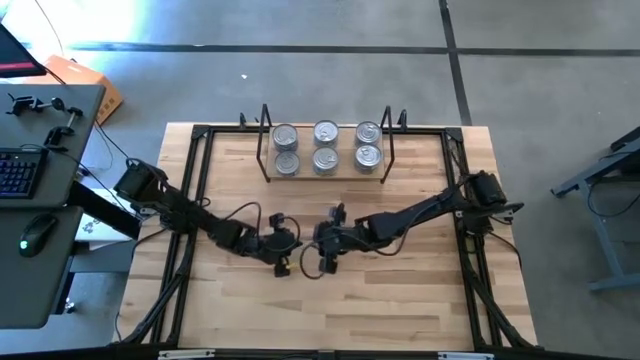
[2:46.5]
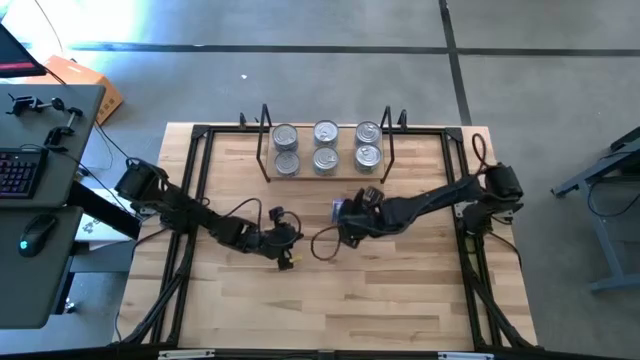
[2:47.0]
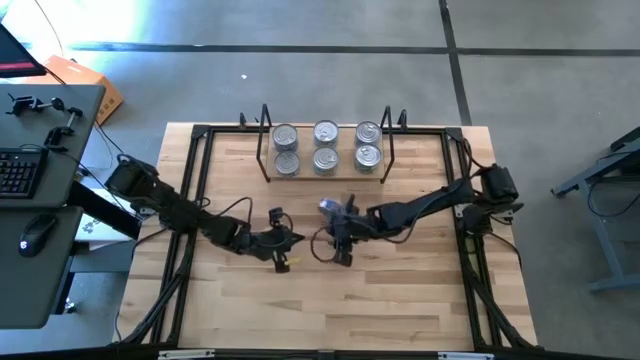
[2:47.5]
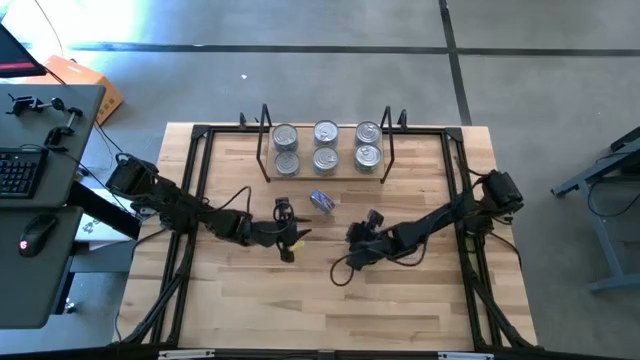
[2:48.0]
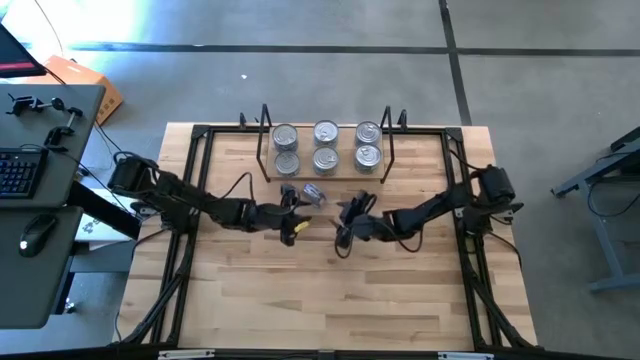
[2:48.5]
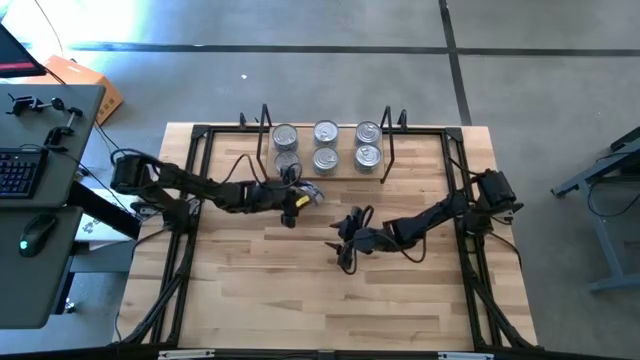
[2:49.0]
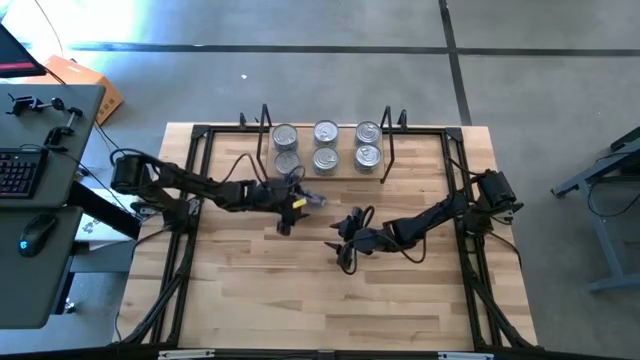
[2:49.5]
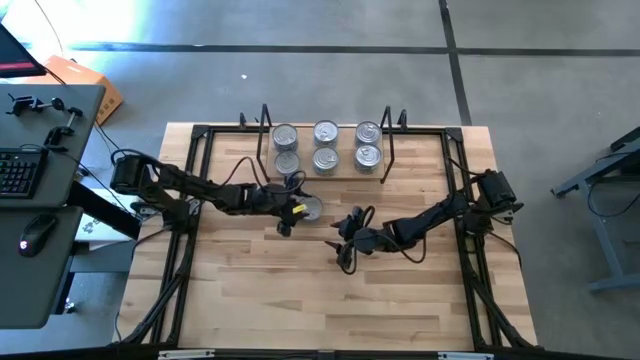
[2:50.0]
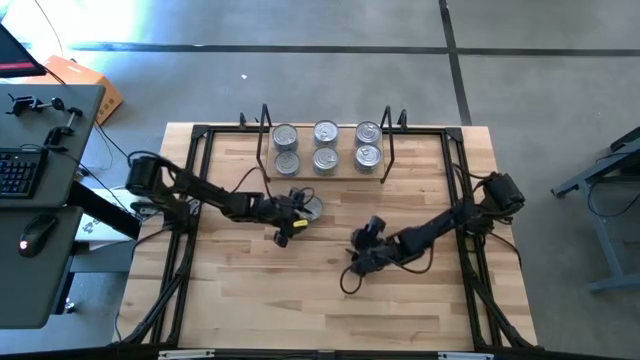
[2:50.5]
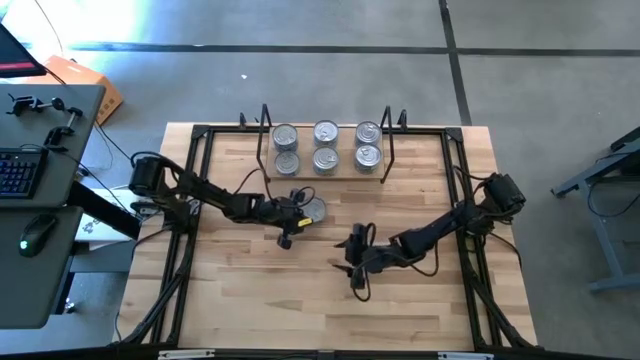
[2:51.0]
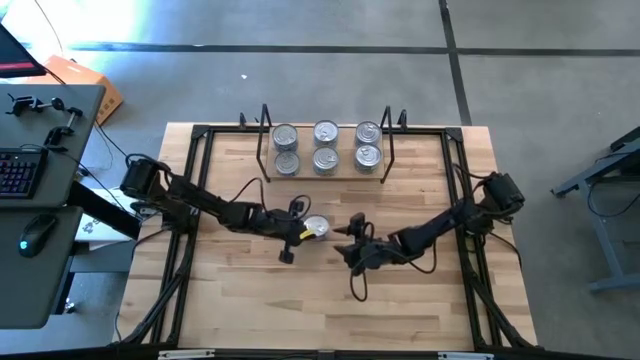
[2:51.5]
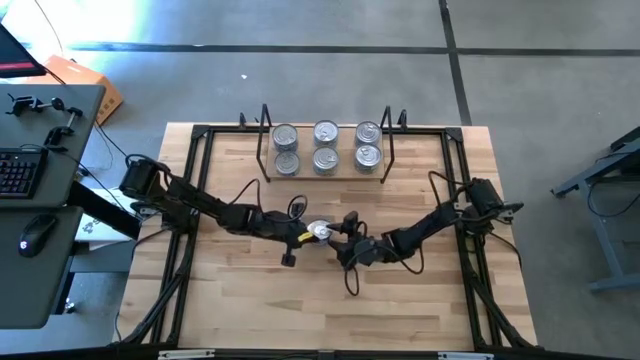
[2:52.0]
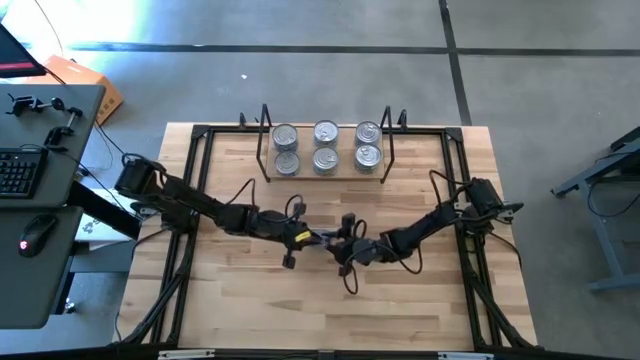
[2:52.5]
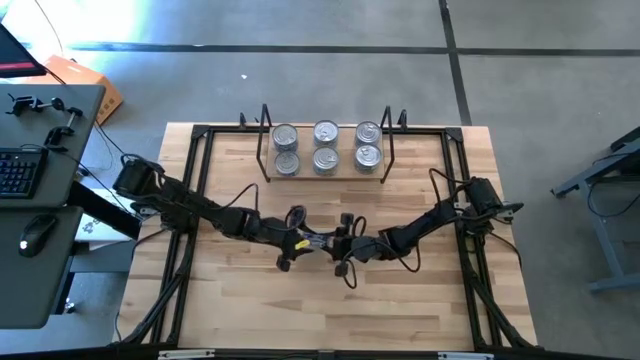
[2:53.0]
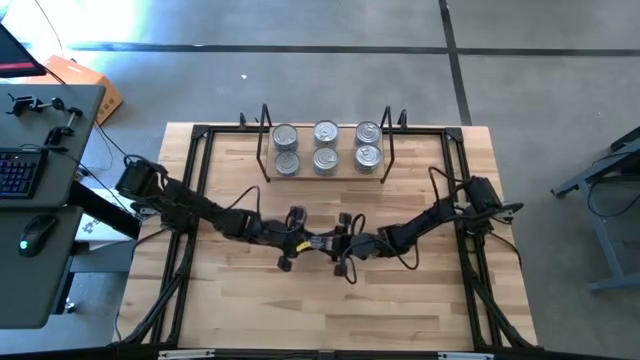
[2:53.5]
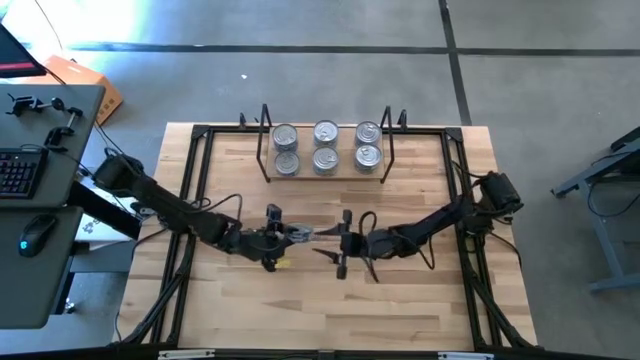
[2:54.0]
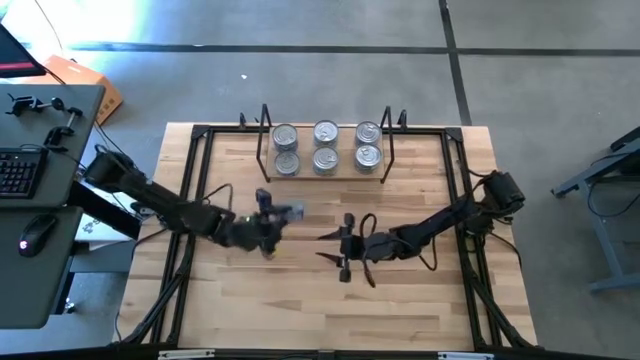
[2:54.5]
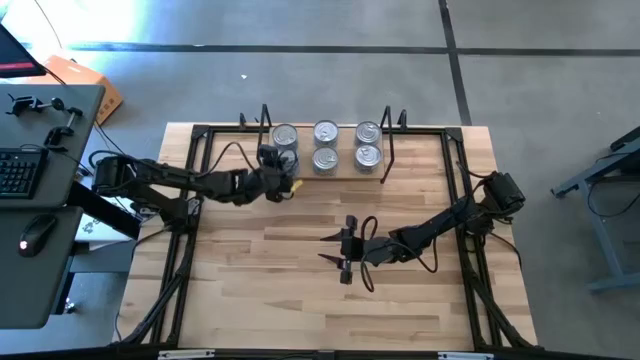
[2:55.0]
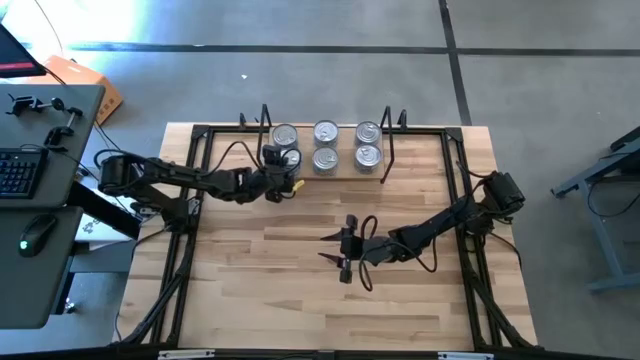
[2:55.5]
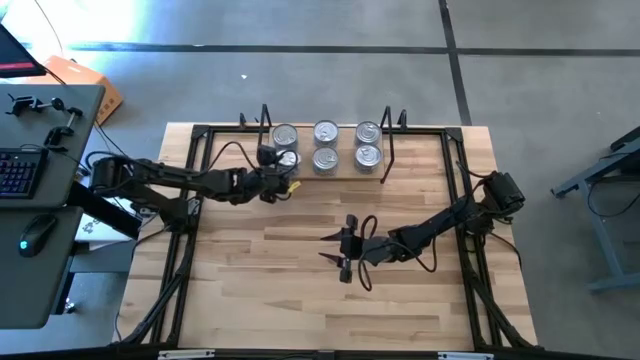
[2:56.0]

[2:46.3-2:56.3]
Task: Stack canned seafood by type on shelf
Stack the blue tuna can on top of the other blue tuna can on the shelf

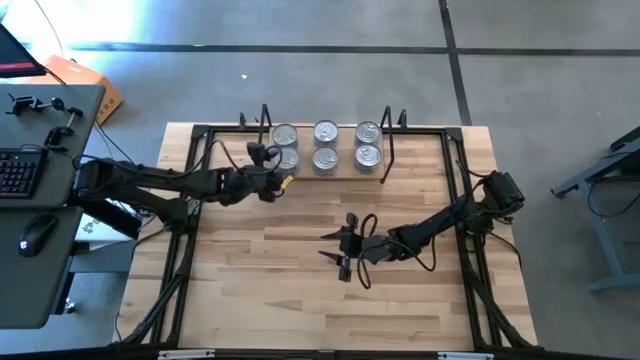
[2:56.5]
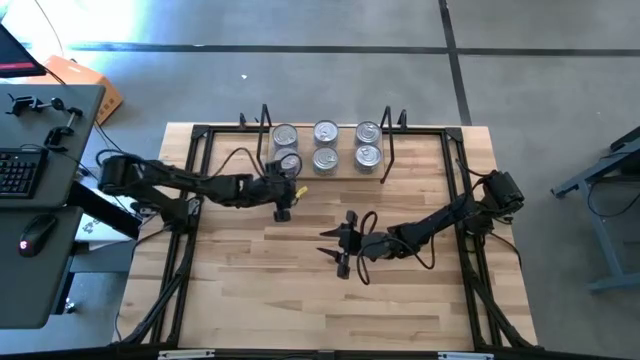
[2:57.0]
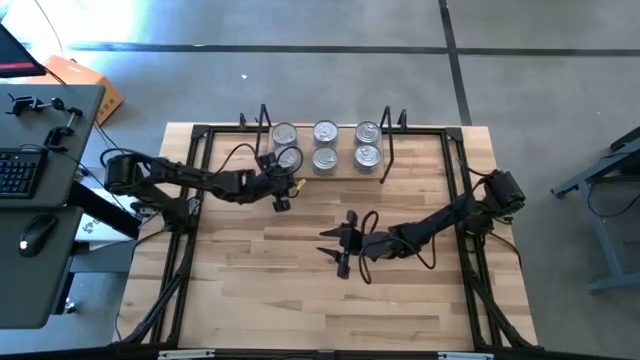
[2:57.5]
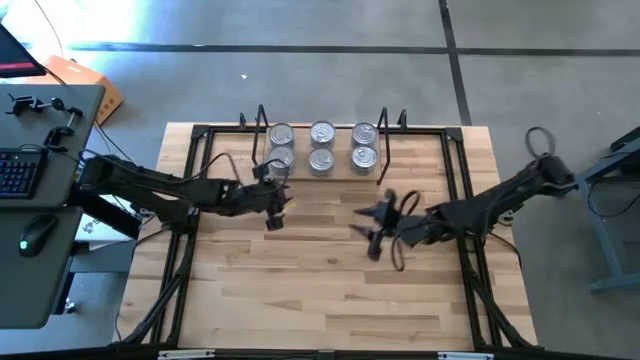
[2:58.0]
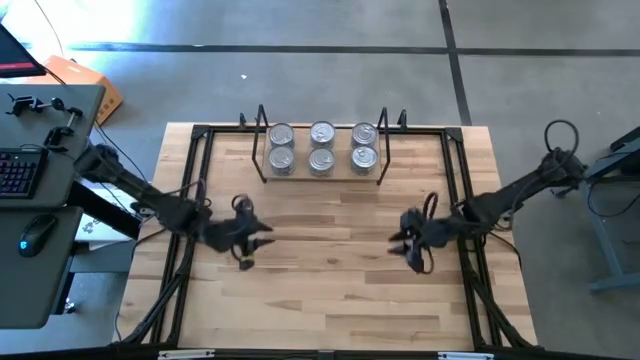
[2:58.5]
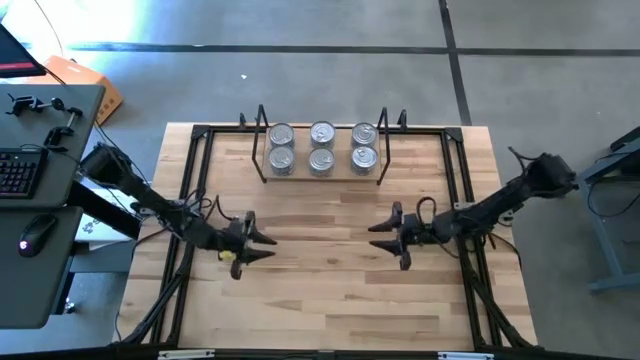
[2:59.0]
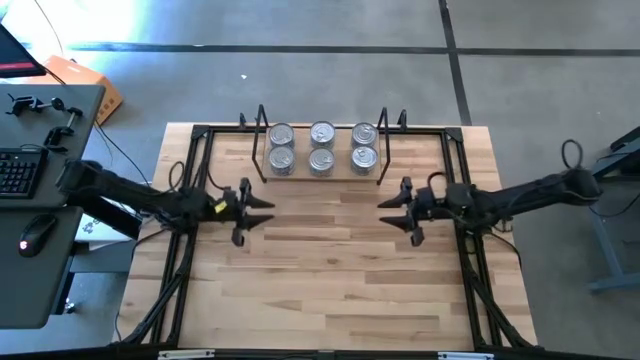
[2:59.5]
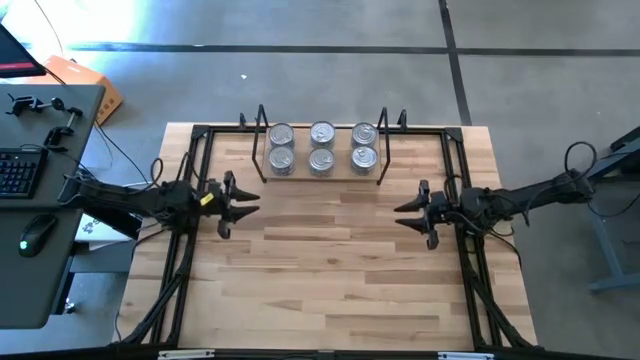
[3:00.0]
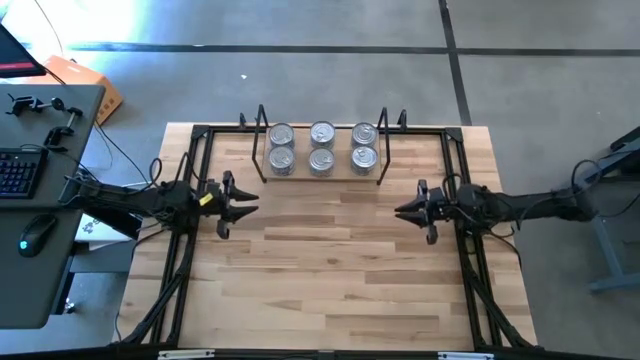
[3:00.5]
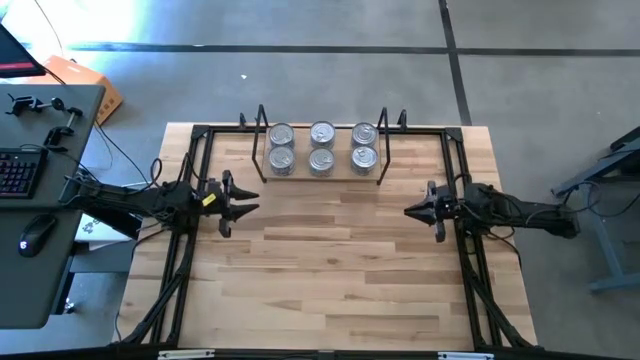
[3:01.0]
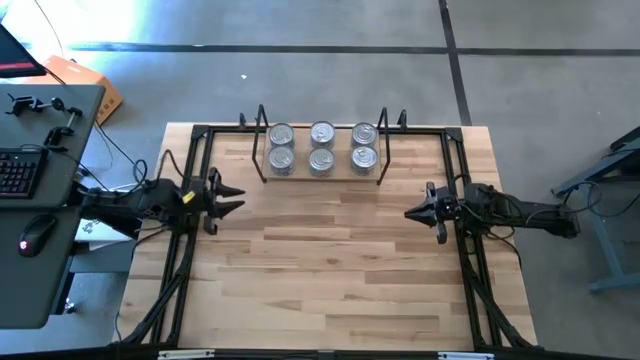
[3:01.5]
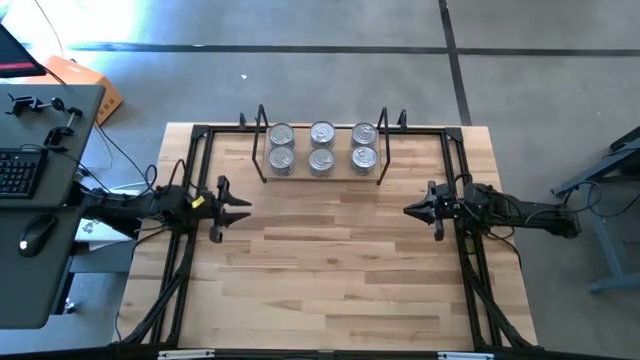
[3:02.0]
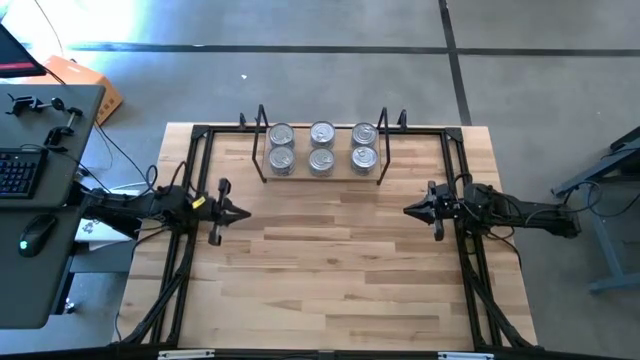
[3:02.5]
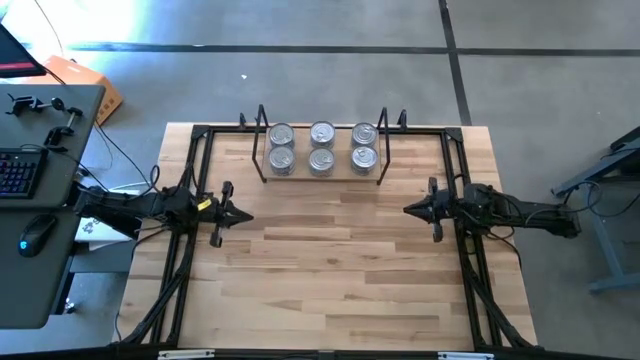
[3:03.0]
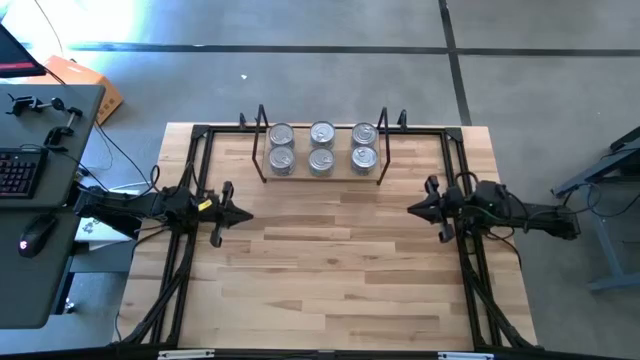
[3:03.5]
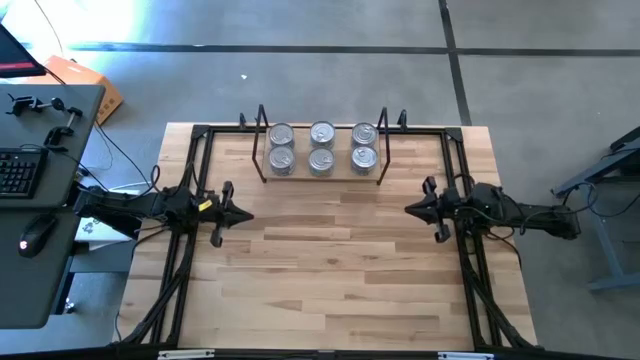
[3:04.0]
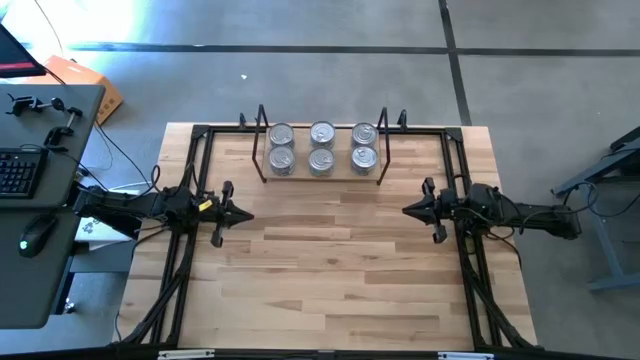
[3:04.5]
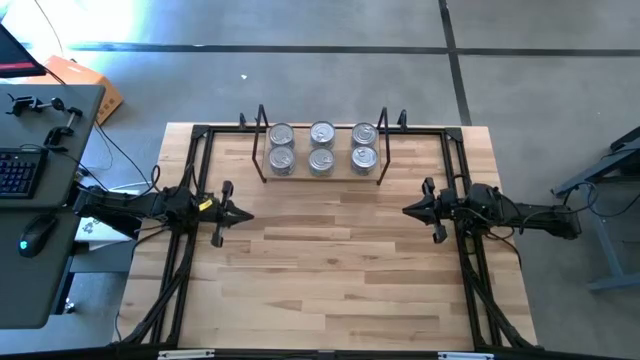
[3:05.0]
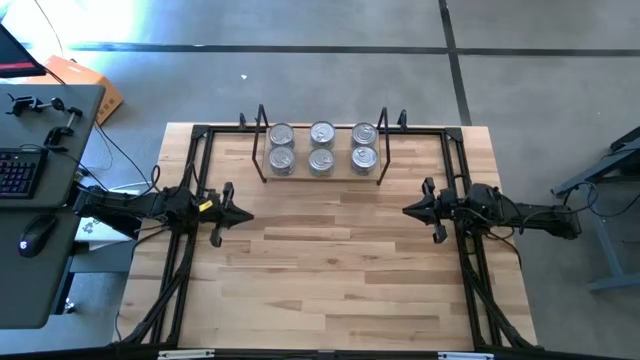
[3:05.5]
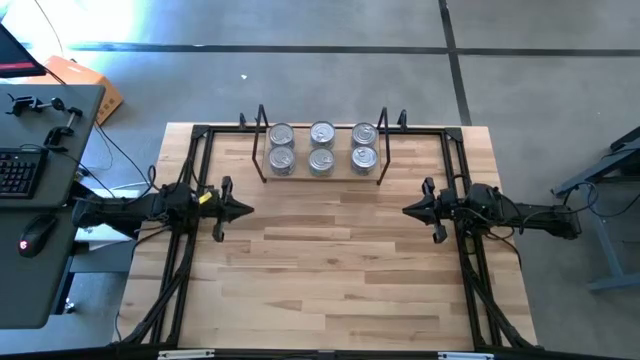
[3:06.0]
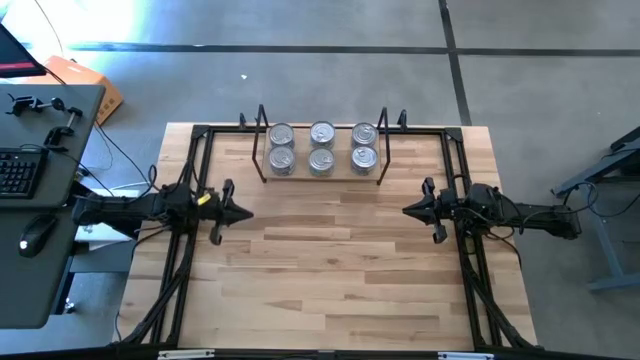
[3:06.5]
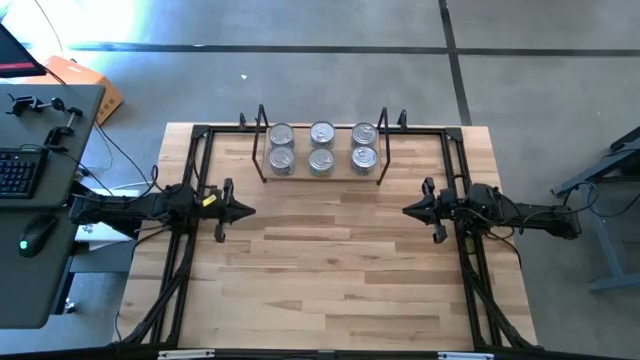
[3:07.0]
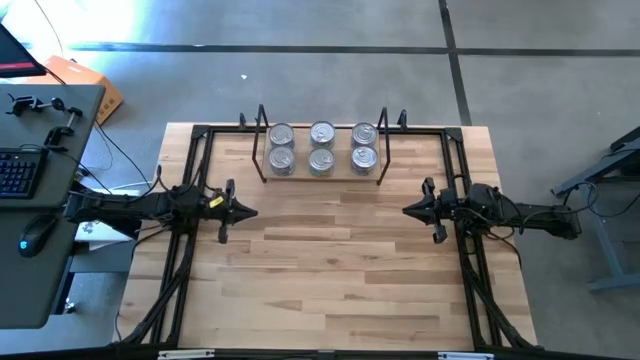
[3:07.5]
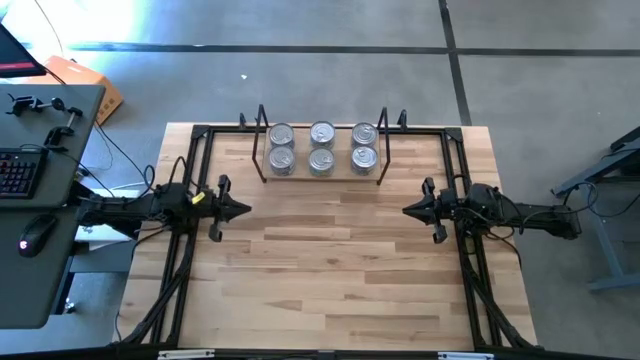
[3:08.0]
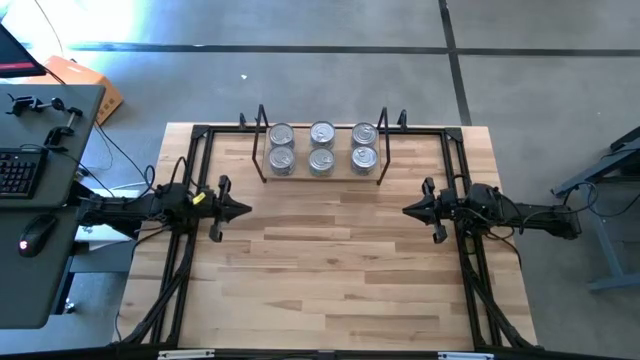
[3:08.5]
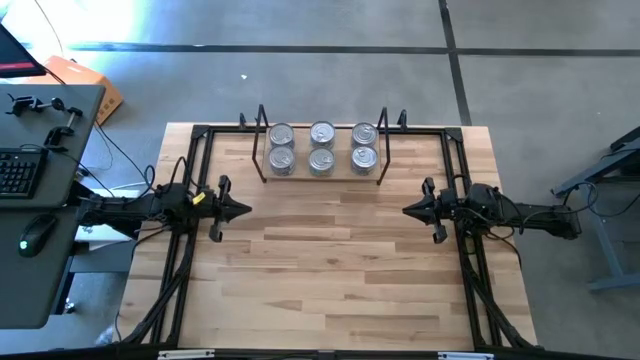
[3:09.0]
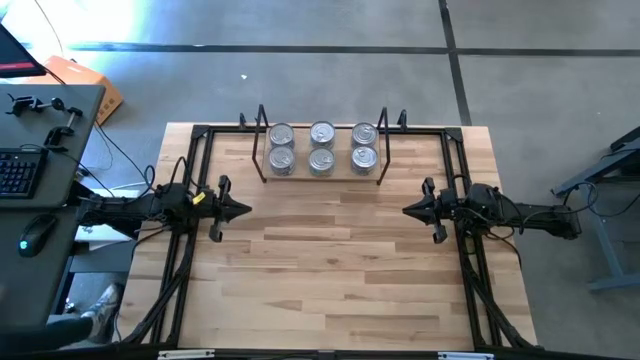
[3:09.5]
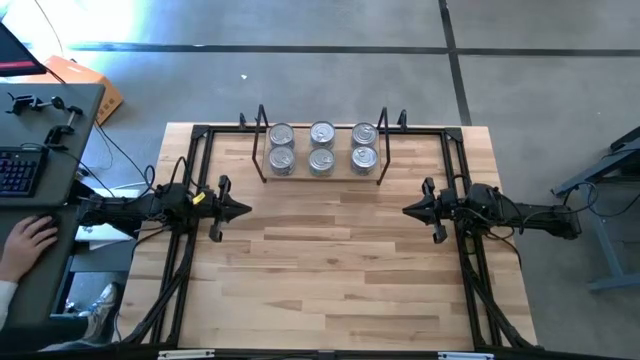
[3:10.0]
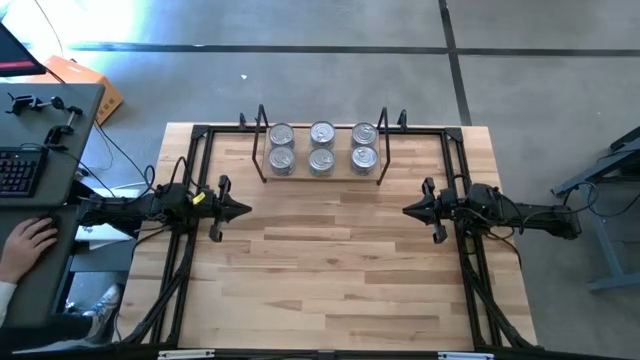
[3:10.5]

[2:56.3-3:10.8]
Return to Home Position
